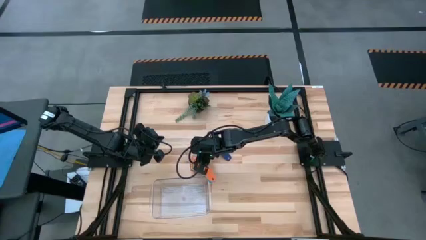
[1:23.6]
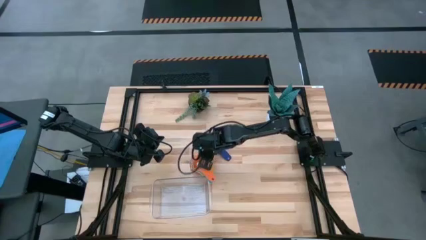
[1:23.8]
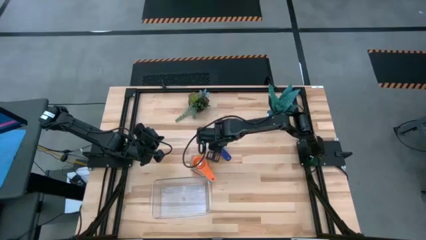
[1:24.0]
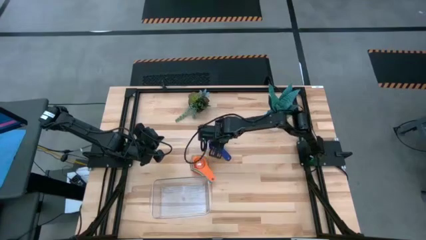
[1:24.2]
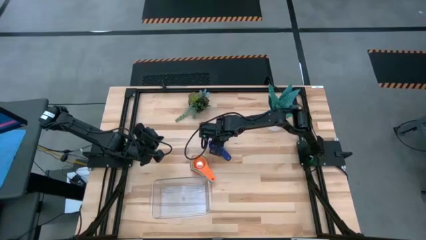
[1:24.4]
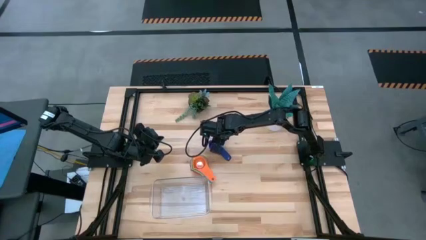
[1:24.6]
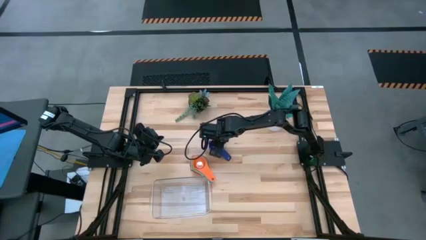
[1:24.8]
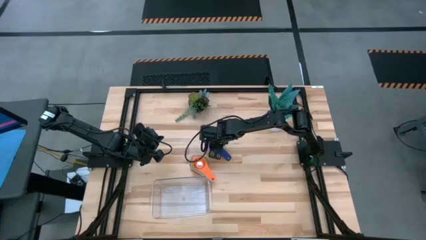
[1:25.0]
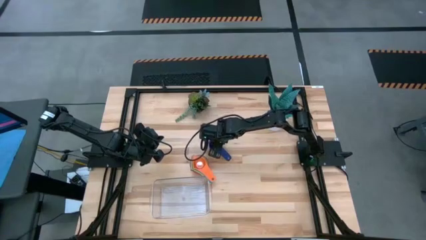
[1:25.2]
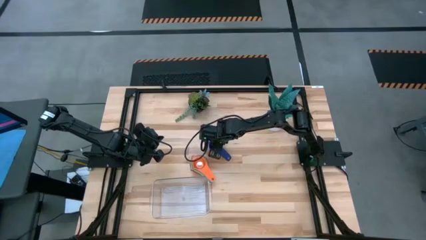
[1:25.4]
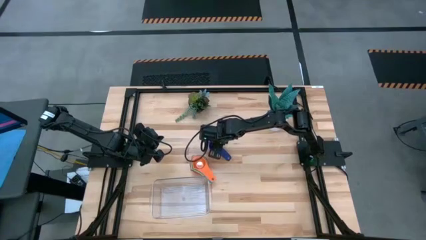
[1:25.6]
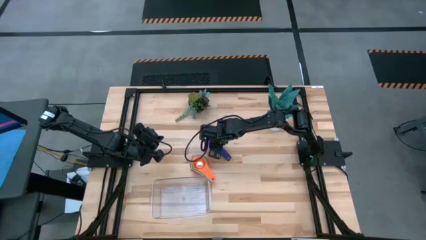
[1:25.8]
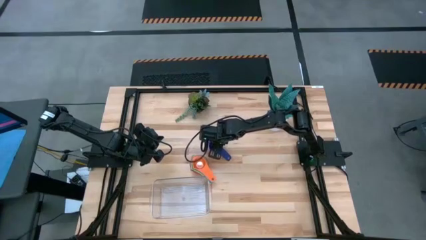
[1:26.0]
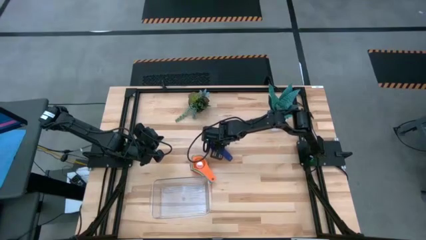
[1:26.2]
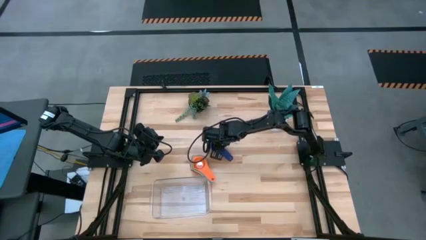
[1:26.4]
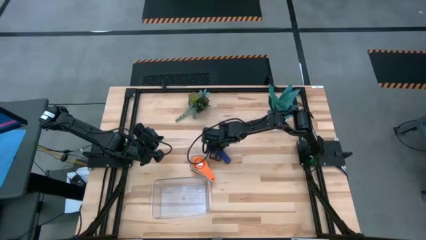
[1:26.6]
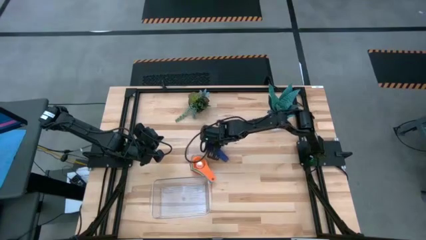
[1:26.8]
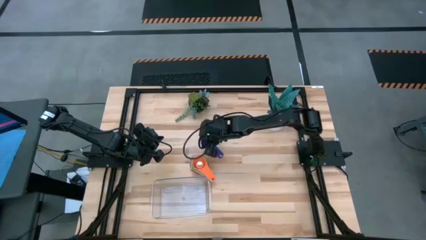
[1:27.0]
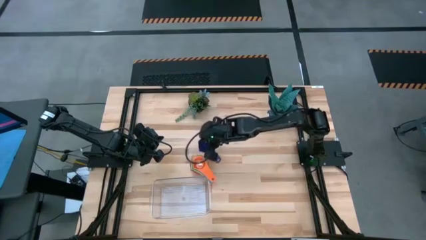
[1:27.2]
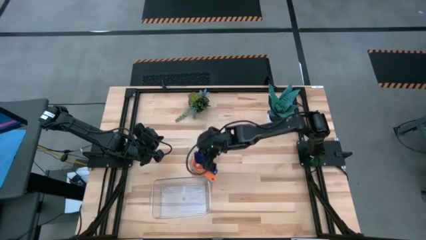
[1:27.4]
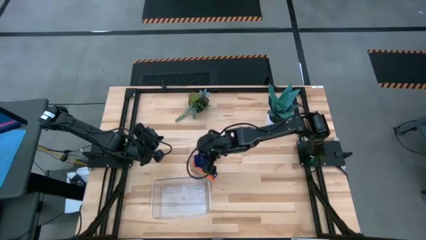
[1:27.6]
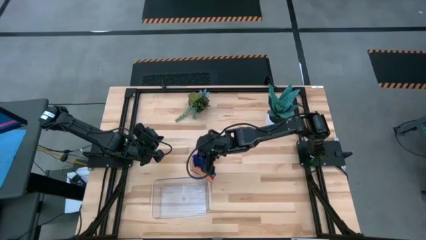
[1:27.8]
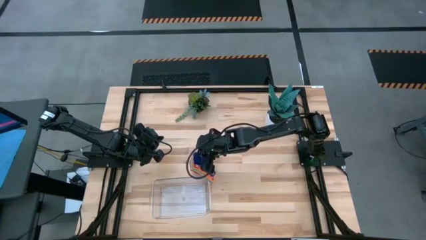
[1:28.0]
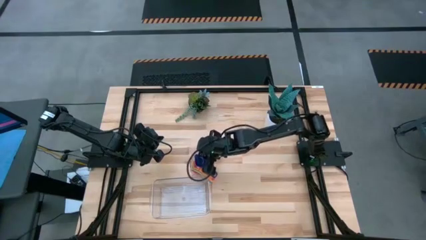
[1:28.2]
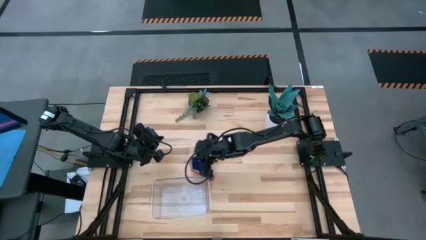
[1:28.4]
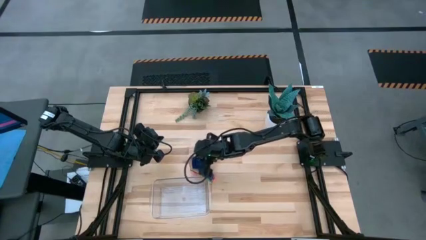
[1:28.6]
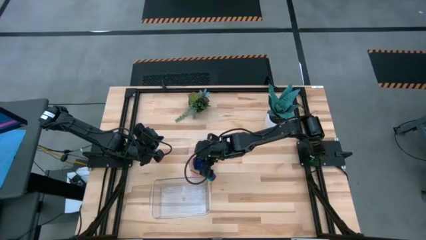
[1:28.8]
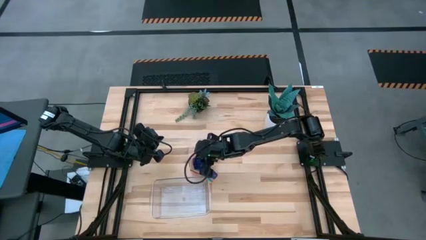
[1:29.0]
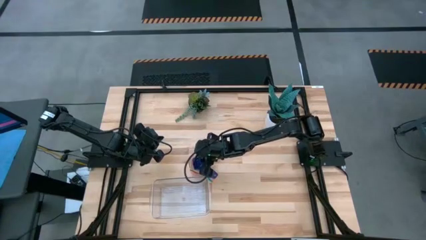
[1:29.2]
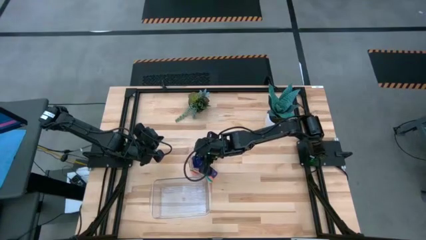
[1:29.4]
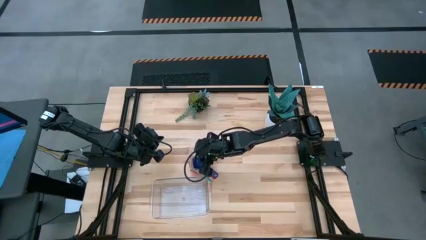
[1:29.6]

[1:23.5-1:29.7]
Task: Nest measuring cups in basket
Stack the violet measuring cup on the orange measuring cup

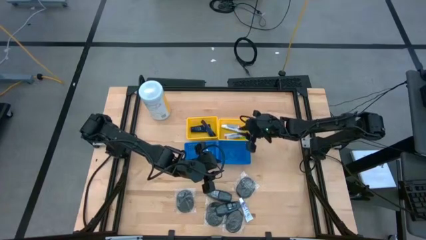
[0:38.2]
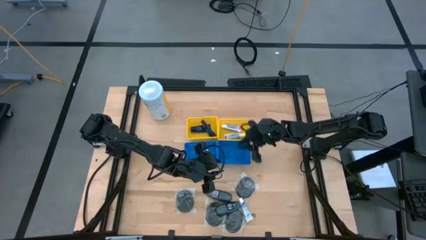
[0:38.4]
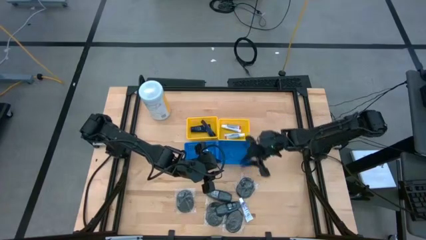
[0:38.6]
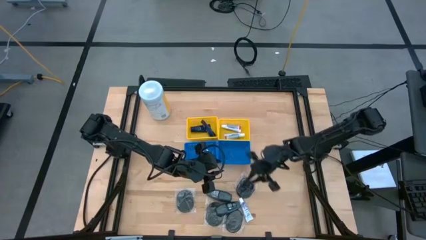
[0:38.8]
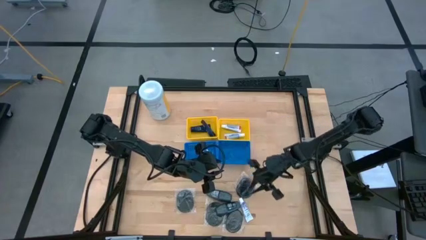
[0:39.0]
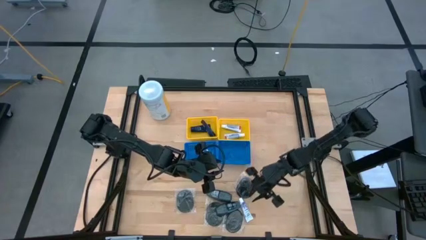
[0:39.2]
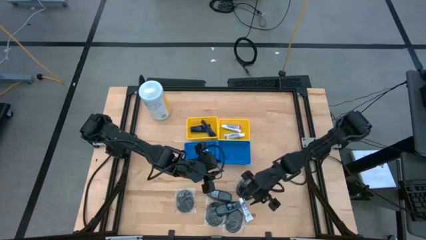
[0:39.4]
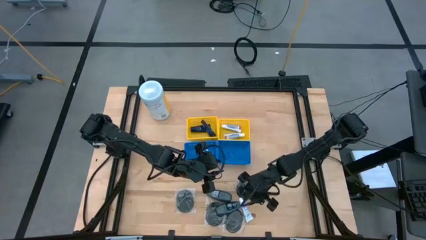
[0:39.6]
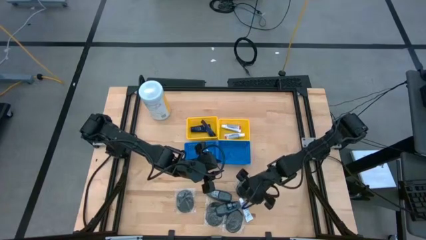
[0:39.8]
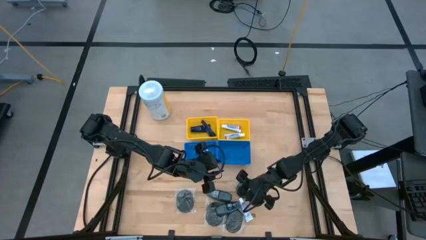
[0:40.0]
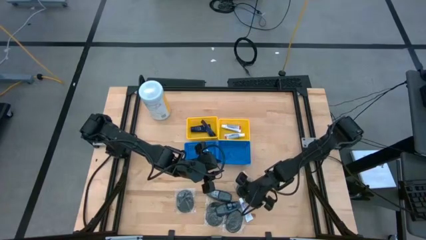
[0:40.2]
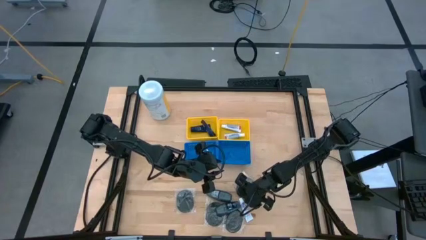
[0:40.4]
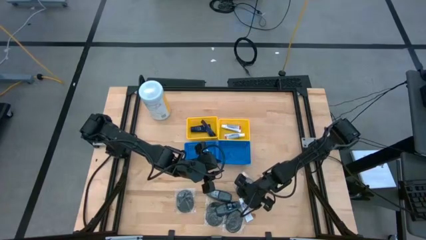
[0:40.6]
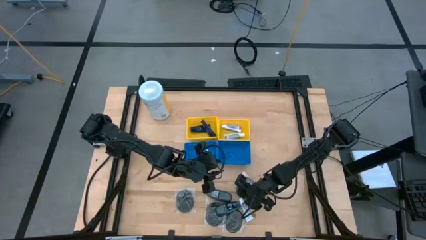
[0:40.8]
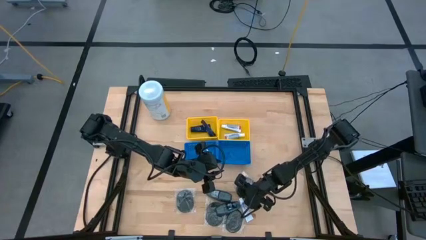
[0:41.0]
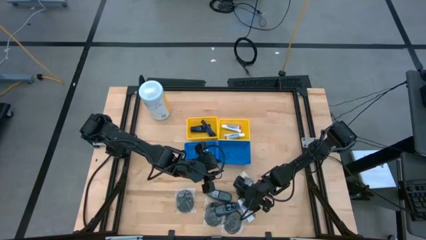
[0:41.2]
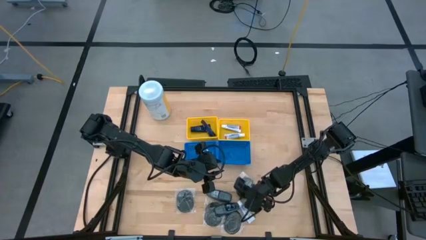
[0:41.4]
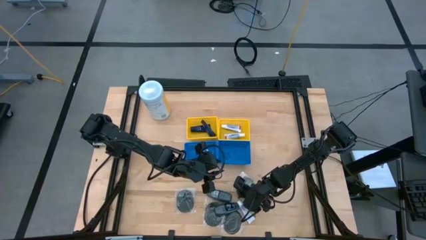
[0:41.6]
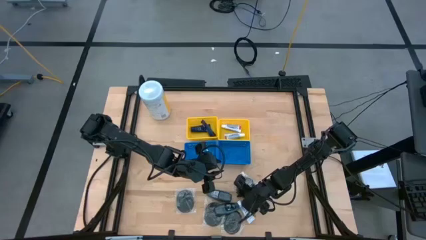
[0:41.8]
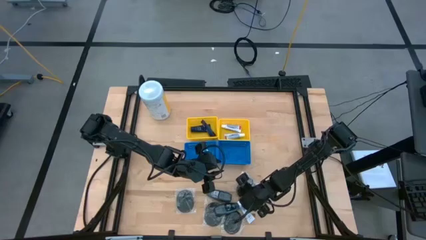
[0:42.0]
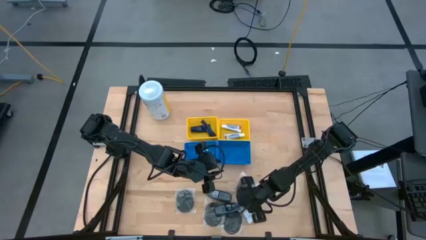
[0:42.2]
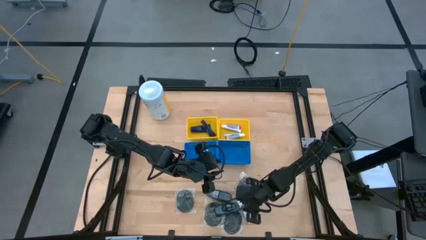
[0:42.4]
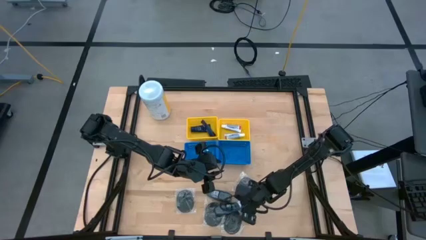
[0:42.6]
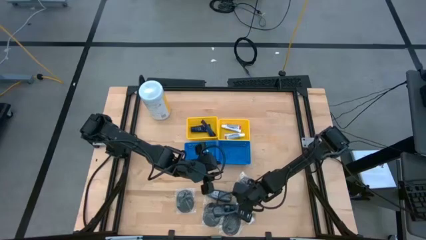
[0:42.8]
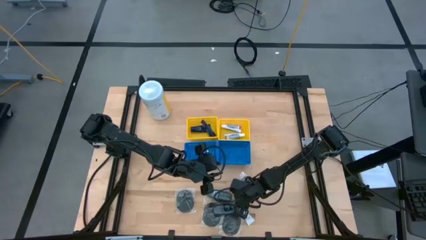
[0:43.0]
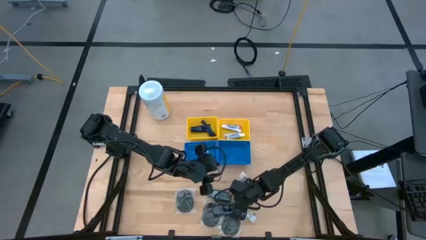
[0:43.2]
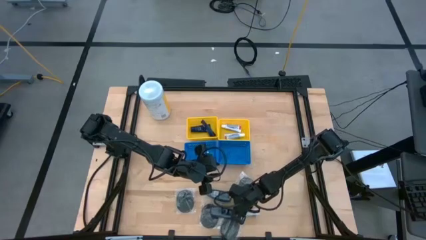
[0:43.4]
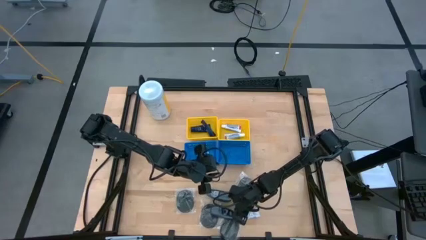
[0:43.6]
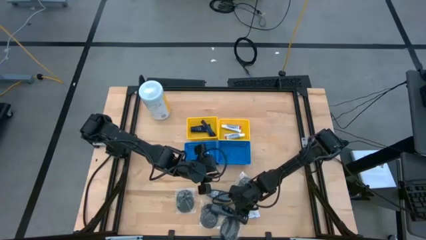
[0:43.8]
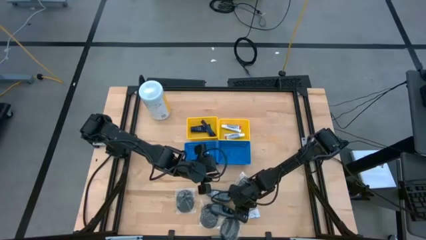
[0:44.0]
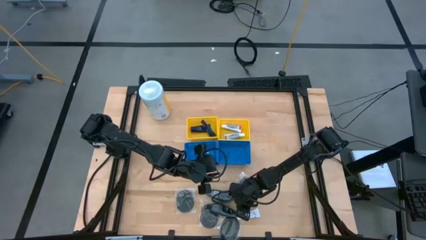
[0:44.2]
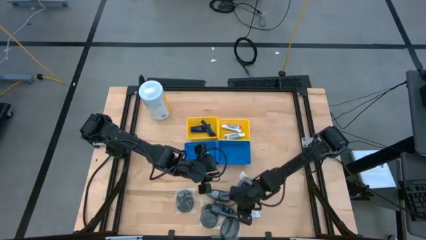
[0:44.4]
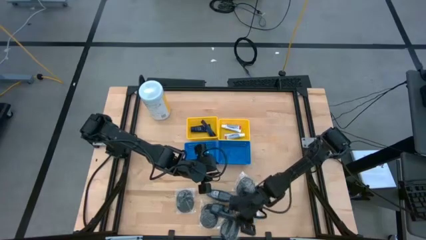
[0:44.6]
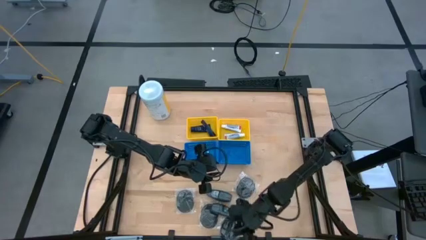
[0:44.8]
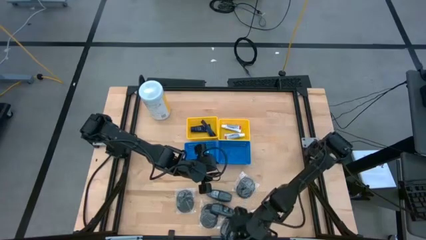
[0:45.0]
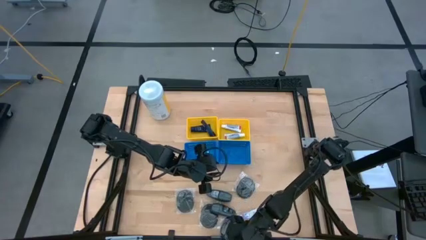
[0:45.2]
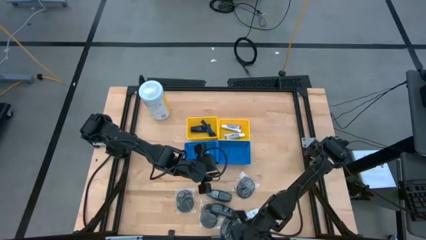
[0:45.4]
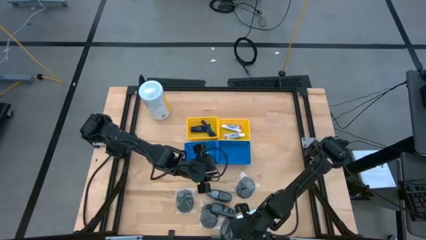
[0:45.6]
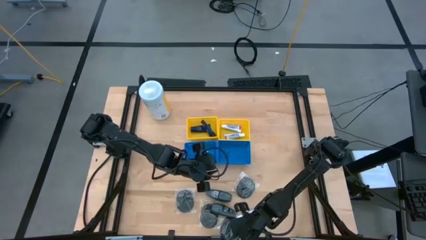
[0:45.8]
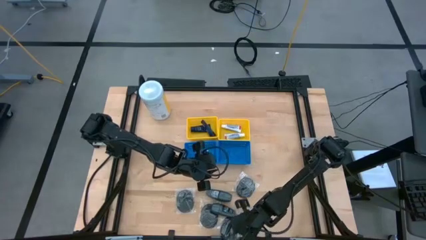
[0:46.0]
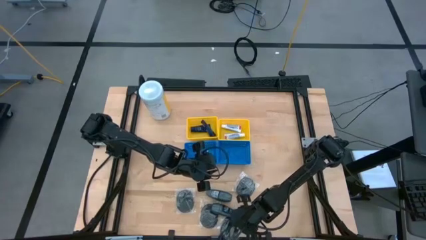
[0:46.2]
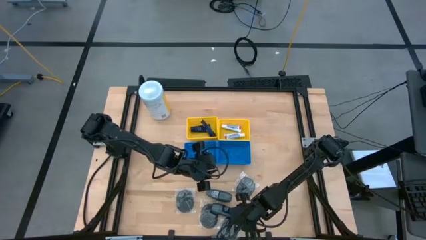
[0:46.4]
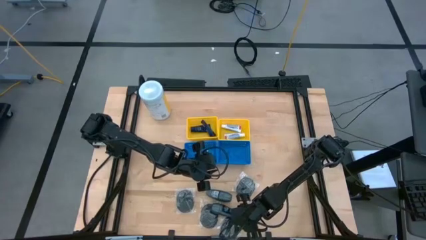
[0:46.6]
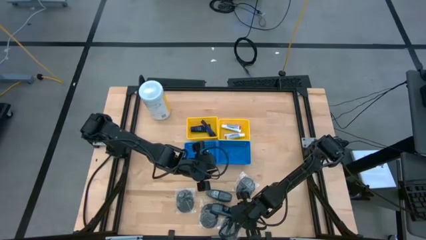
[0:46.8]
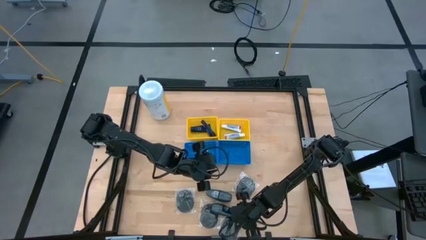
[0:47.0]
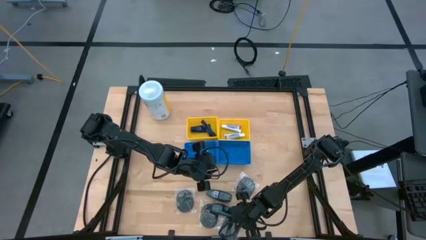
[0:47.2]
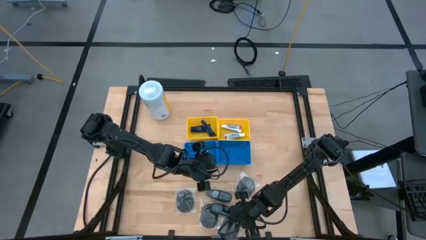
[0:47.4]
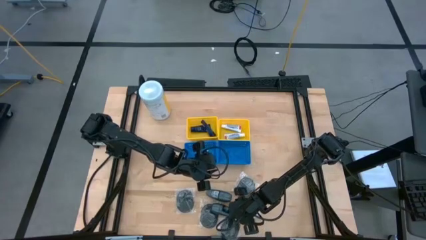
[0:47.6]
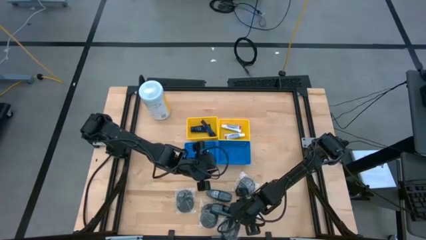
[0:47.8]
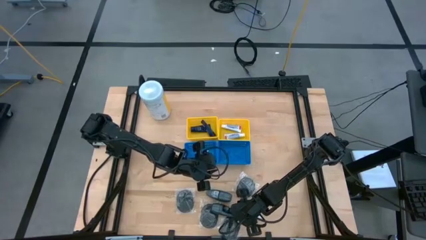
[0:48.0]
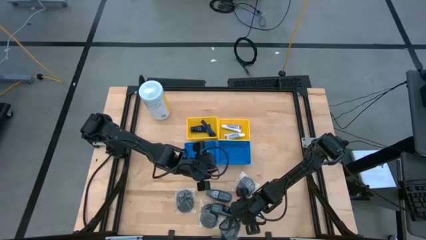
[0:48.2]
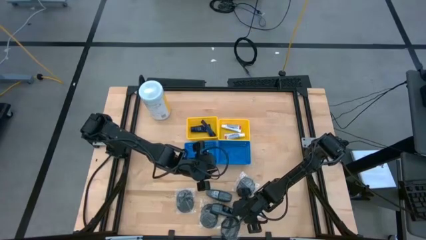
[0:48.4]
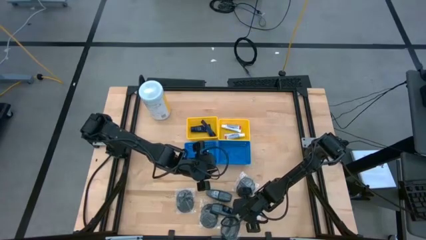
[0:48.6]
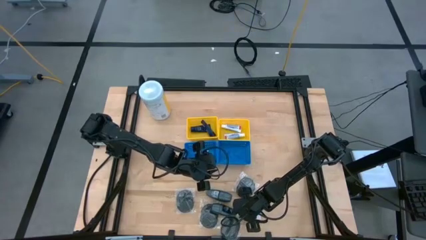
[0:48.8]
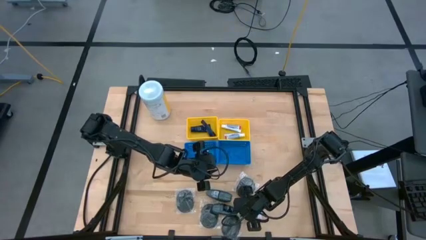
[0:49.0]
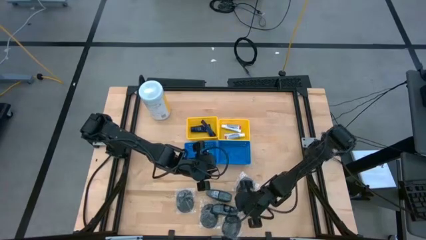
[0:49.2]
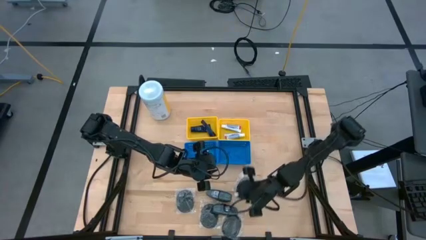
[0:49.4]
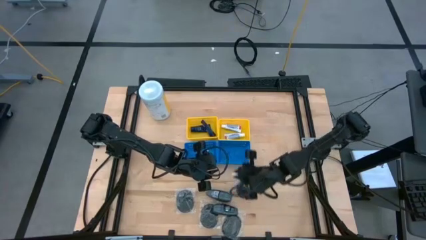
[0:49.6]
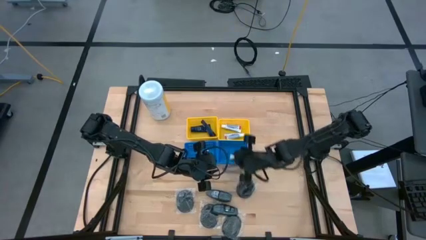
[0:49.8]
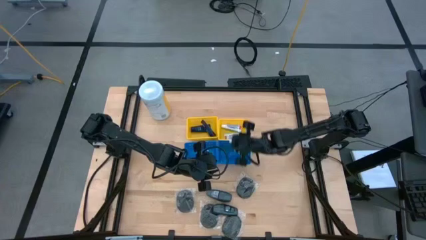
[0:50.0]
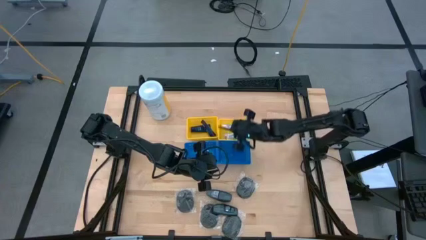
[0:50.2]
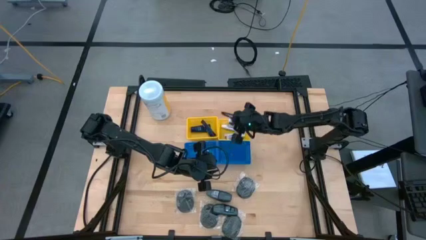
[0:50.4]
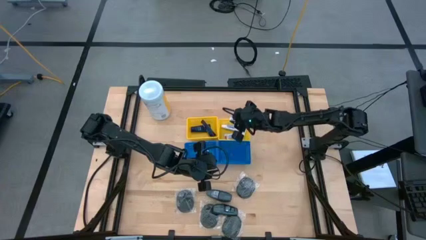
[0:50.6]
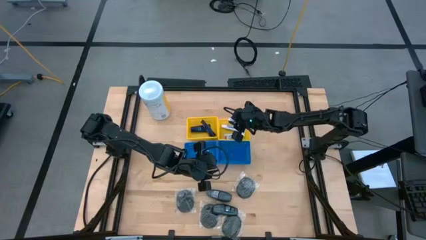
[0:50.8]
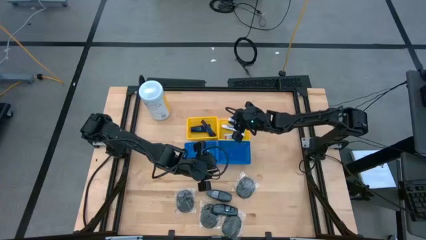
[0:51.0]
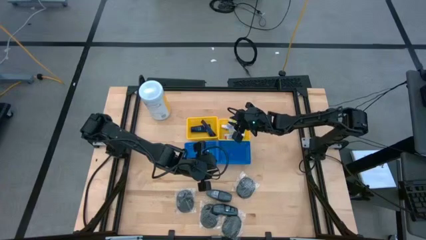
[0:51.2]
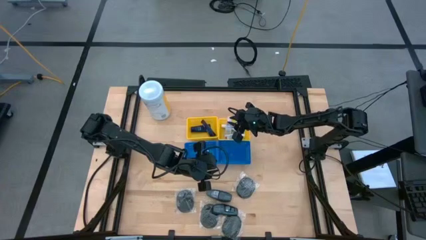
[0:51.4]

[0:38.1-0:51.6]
Task: Pick & Place Travel size toiletries
Put the toothpaste into the right yellow bin
